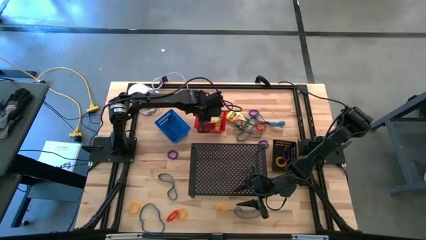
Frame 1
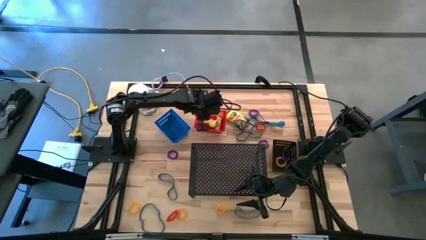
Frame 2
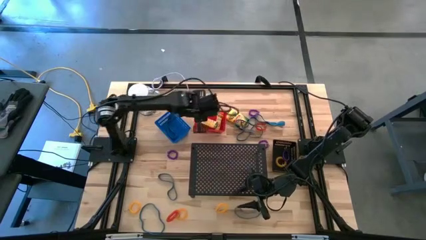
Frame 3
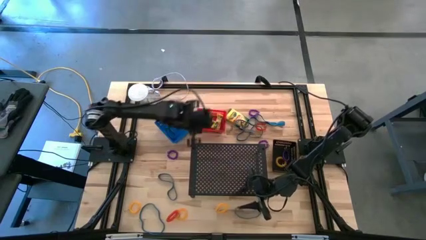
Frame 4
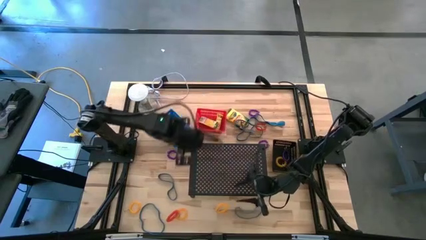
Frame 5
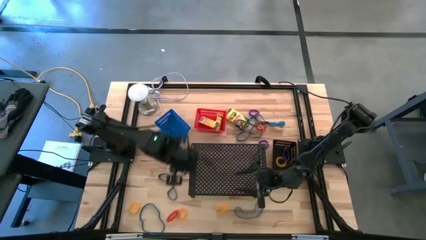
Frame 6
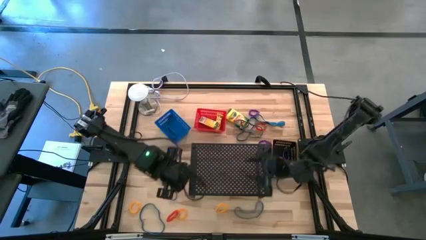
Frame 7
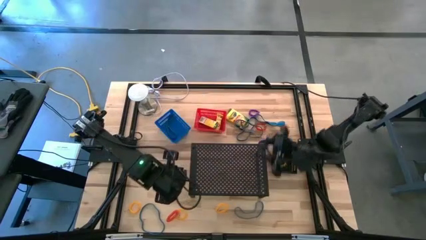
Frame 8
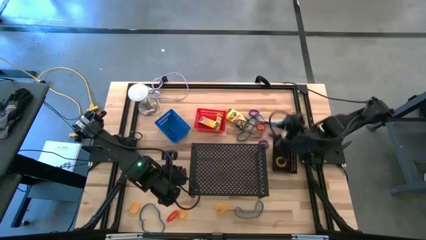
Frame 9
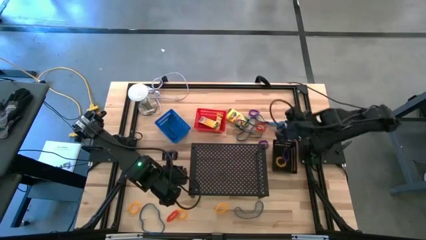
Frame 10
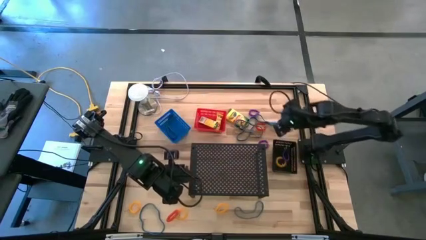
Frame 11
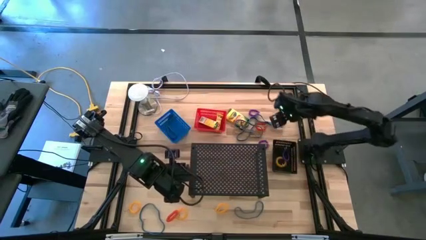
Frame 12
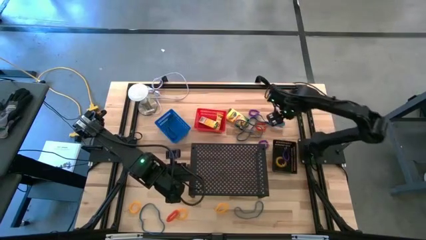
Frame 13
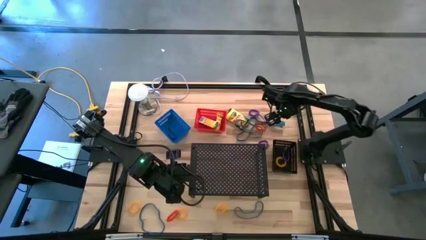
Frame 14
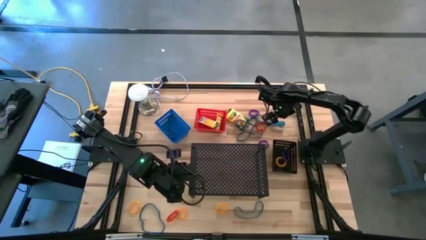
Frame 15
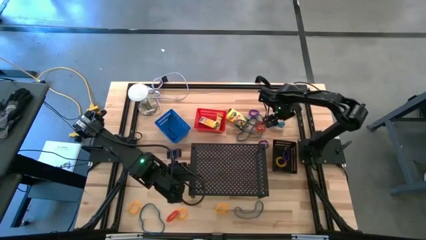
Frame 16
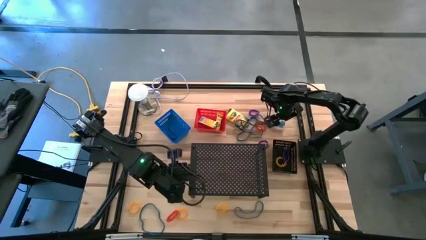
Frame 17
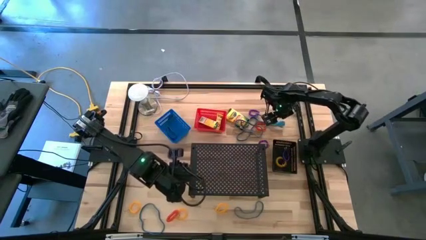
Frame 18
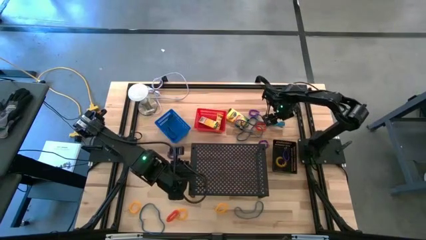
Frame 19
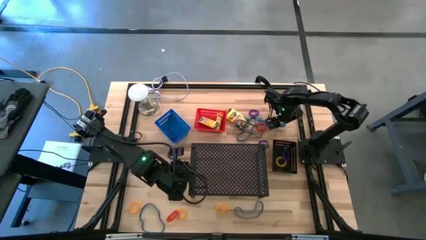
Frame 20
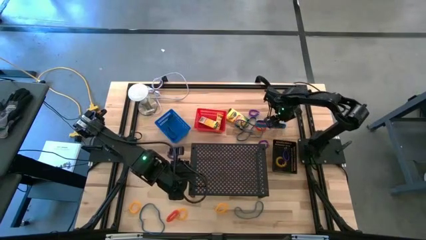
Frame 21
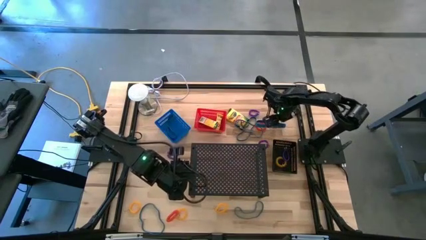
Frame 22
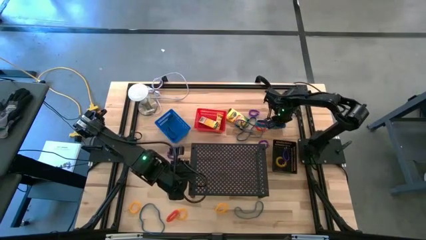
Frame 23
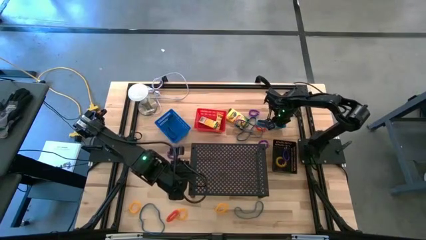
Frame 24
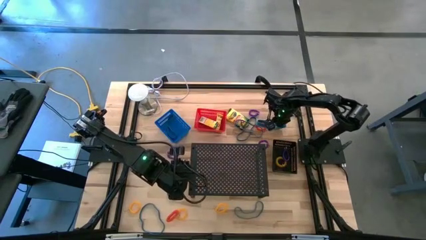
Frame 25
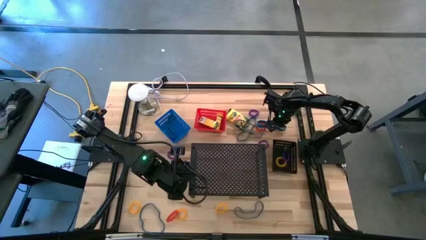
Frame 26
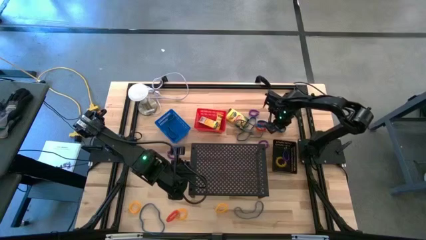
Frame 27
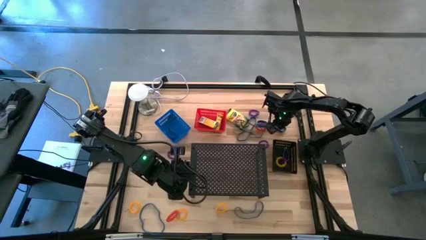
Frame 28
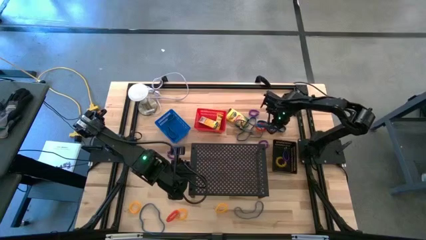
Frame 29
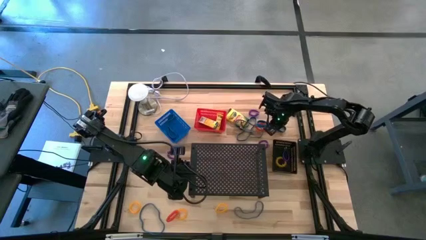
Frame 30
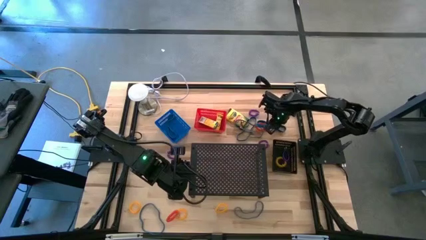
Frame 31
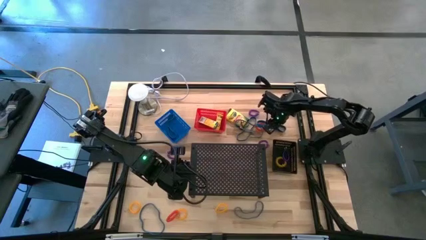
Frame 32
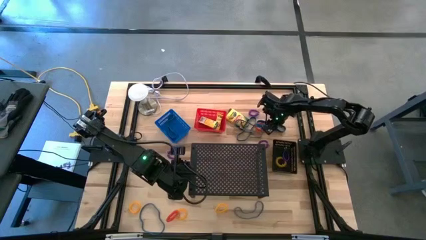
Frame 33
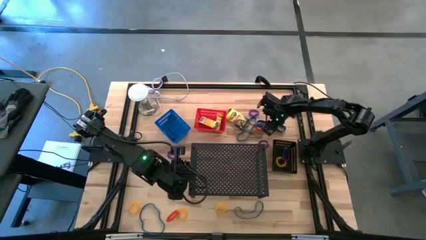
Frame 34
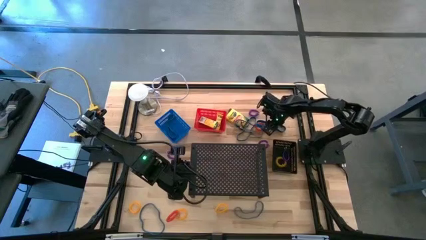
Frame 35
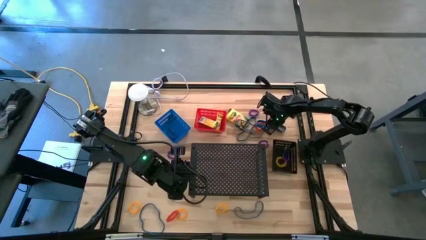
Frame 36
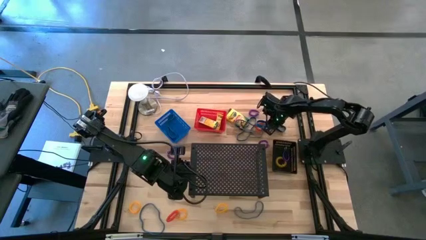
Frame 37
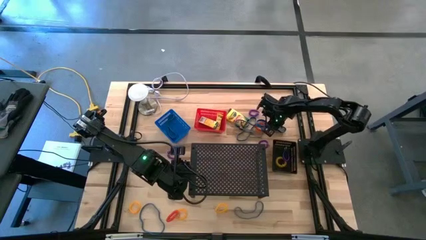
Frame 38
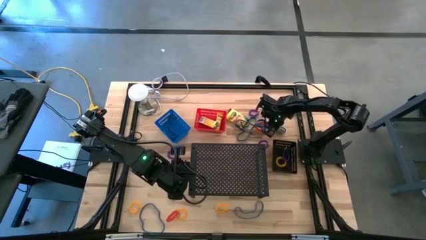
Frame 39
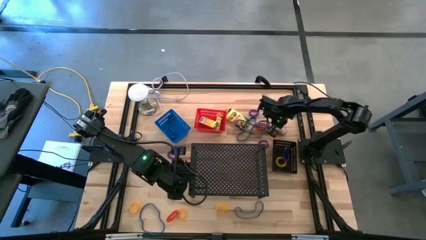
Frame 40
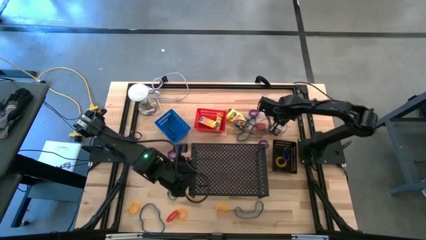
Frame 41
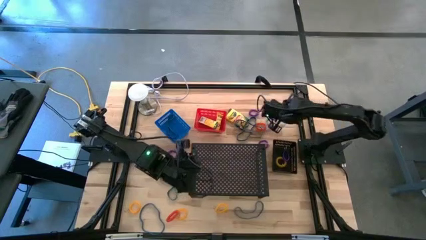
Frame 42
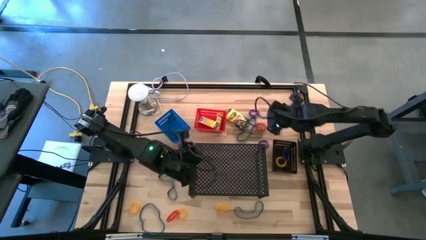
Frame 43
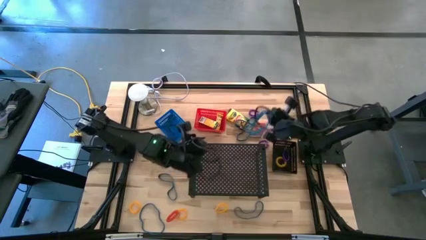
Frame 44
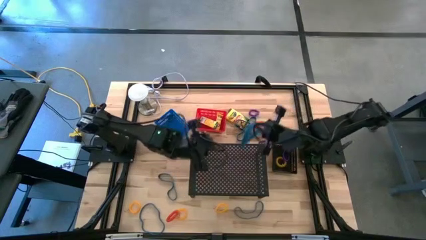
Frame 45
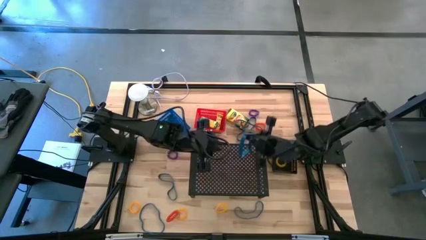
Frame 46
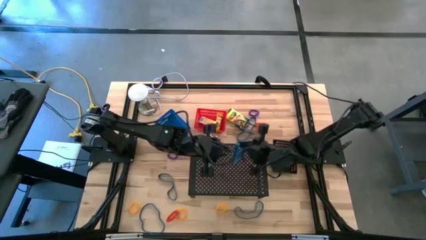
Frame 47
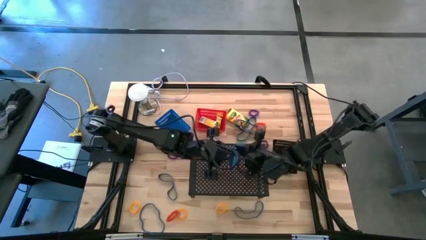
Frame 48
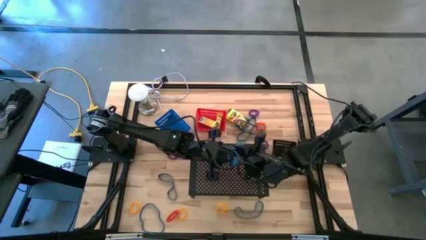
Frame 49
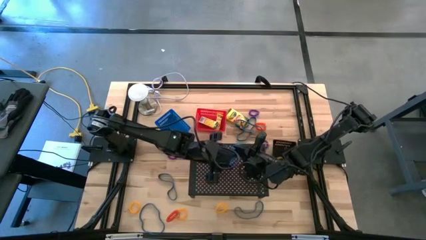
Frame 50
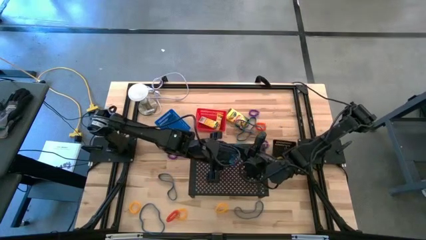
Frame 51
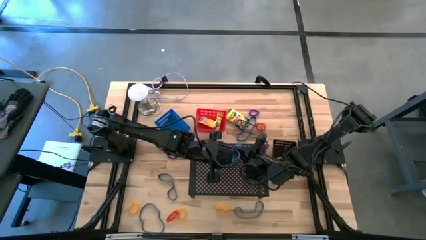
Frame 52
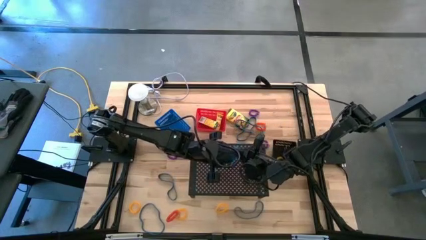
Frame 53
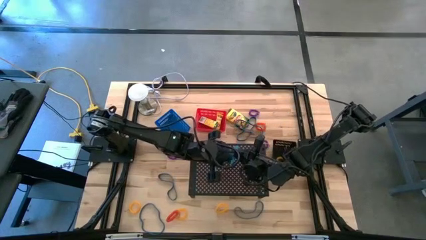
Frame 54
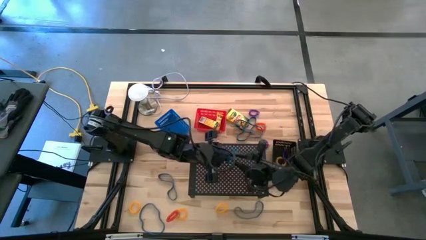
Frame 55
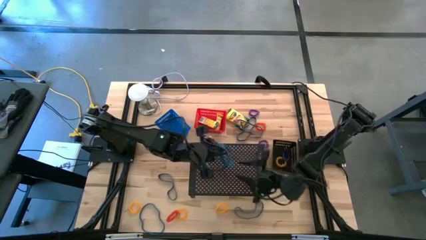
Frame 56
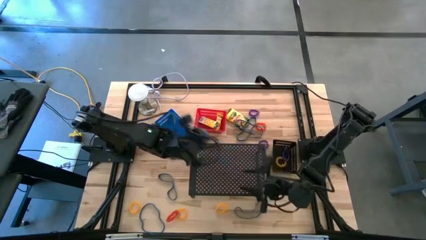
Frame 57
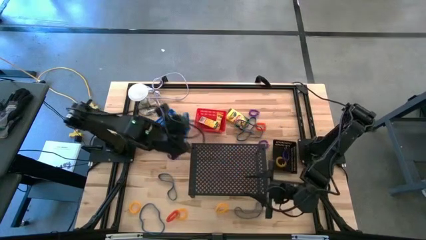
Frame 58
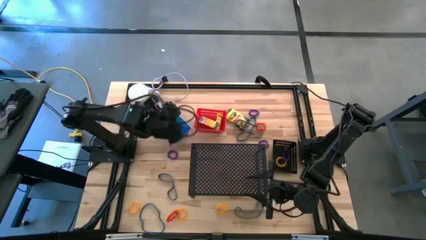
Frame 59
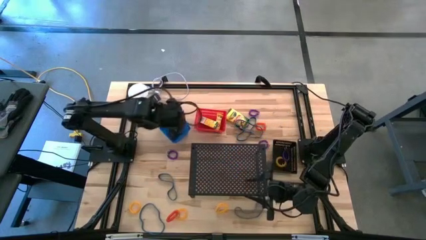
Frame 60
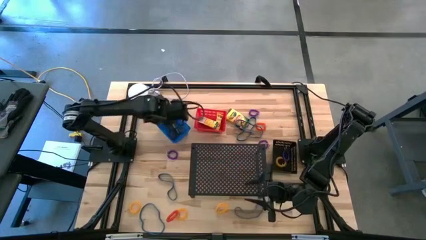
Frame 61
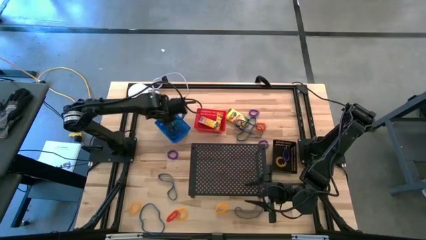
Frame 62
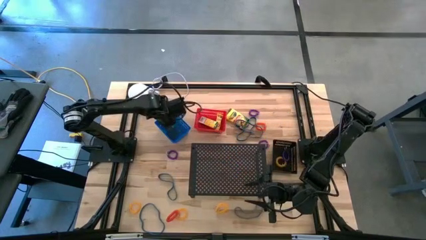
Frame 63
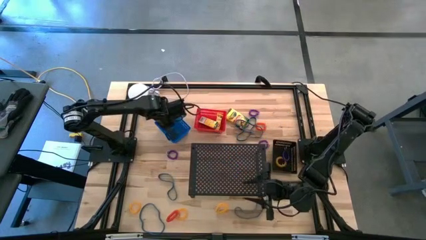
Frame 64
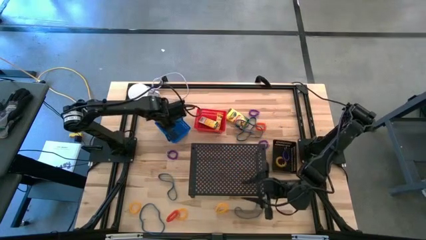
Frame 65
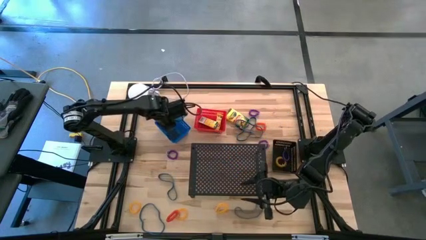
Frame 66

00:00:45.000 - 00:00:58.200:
Task: Pick & Place Office Desk Supplies
Put the blue rubber band into the blue bin
